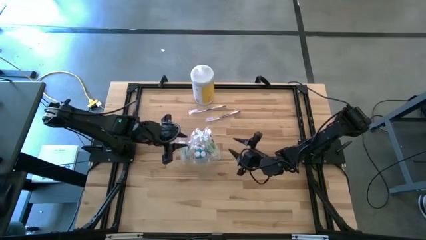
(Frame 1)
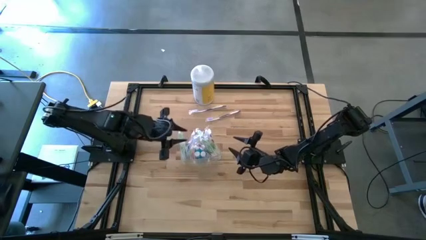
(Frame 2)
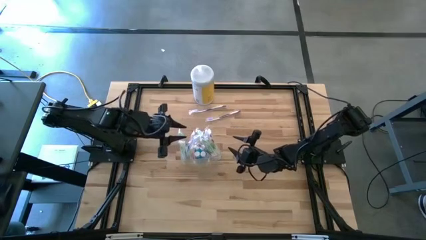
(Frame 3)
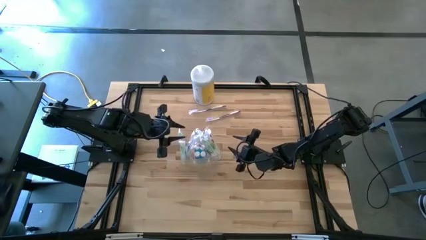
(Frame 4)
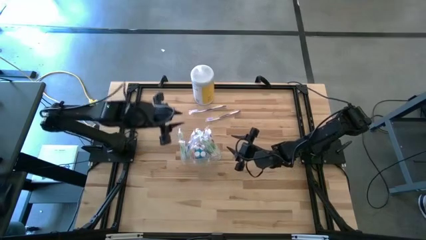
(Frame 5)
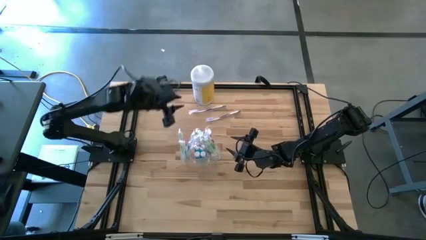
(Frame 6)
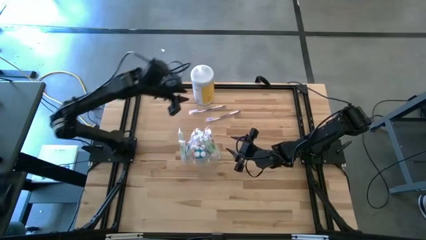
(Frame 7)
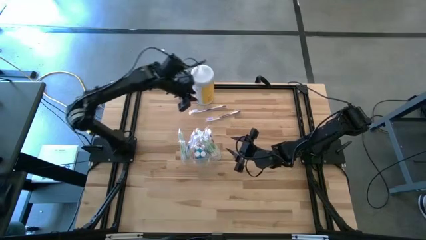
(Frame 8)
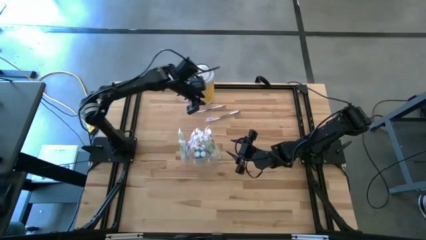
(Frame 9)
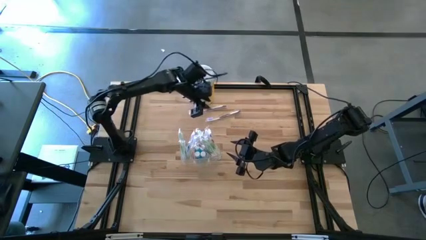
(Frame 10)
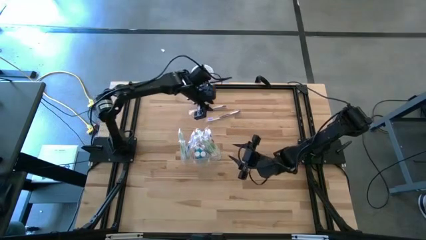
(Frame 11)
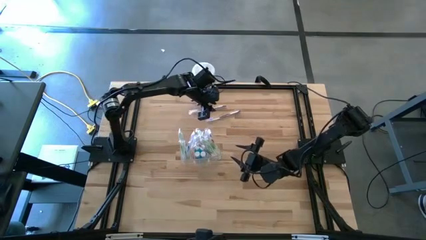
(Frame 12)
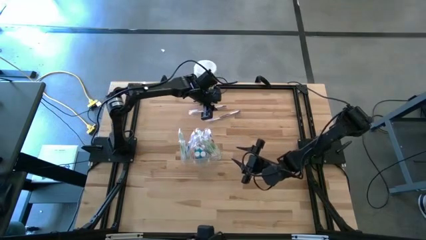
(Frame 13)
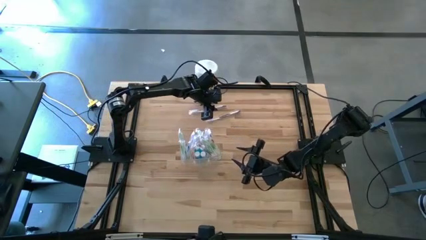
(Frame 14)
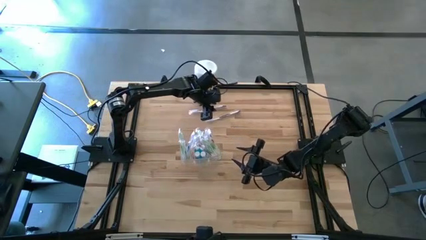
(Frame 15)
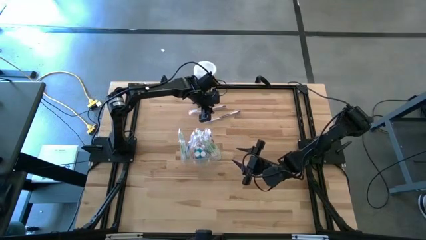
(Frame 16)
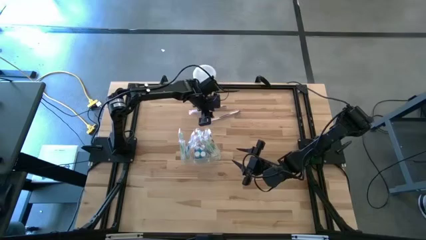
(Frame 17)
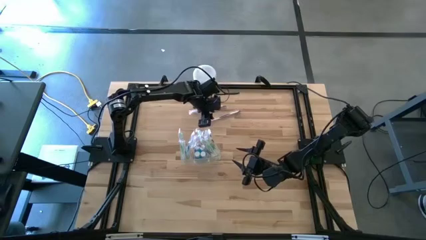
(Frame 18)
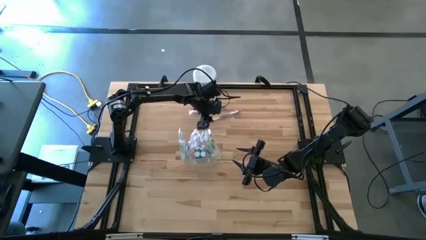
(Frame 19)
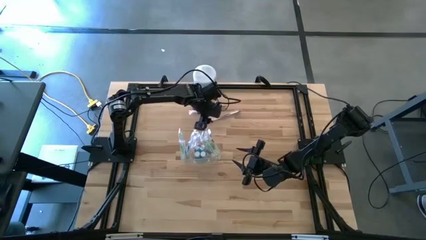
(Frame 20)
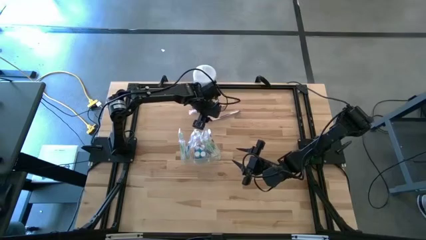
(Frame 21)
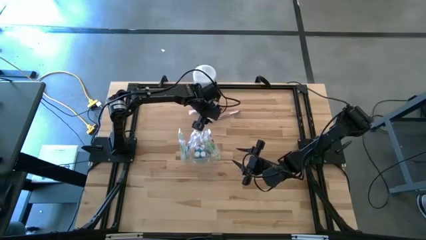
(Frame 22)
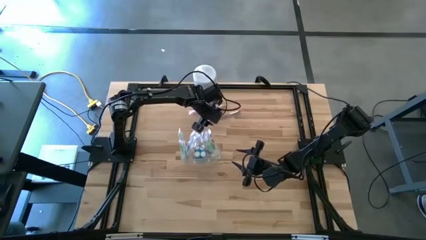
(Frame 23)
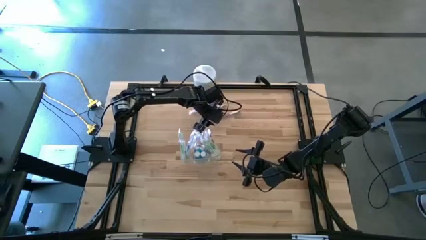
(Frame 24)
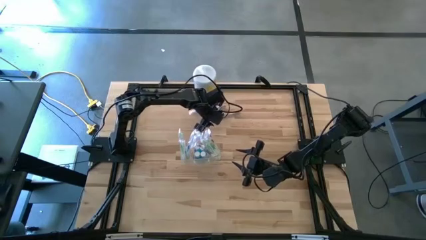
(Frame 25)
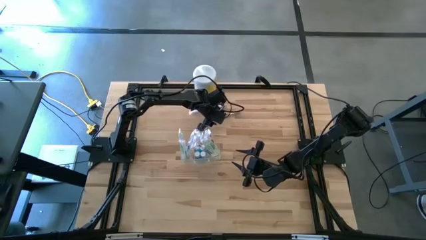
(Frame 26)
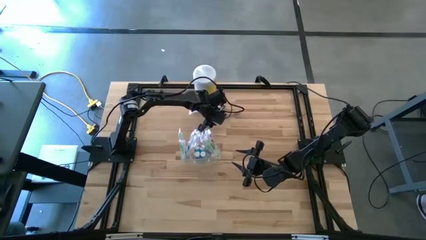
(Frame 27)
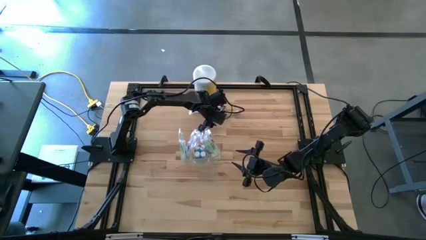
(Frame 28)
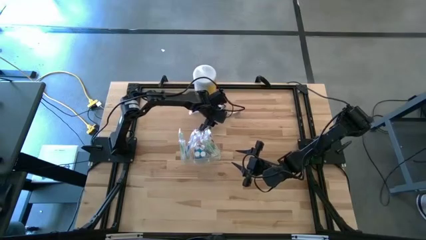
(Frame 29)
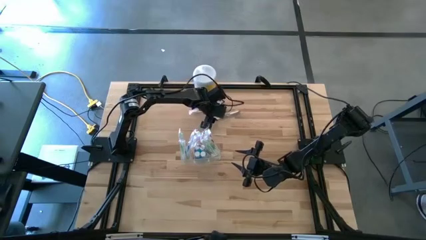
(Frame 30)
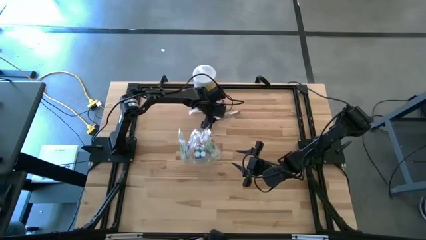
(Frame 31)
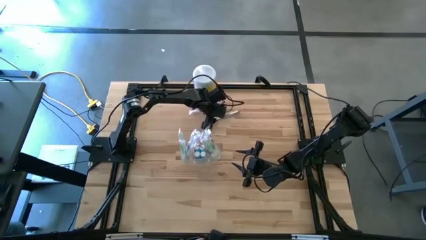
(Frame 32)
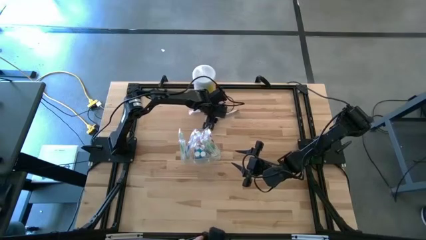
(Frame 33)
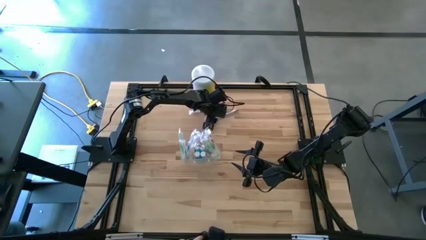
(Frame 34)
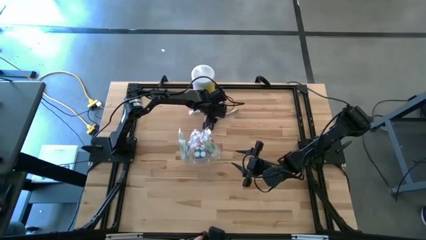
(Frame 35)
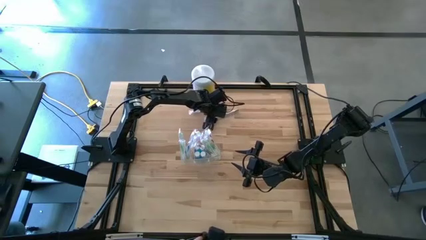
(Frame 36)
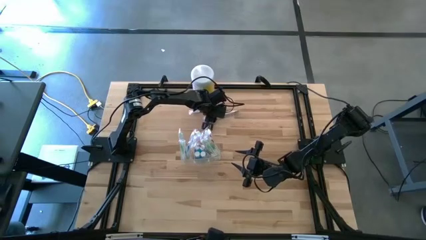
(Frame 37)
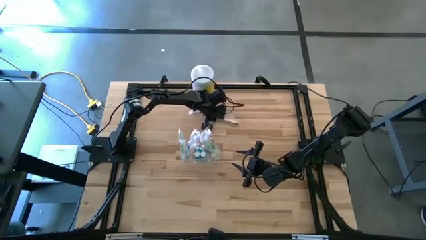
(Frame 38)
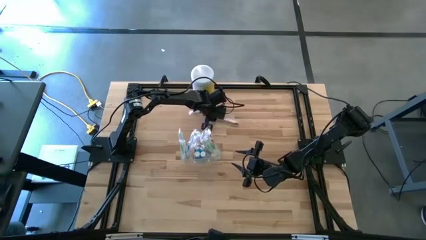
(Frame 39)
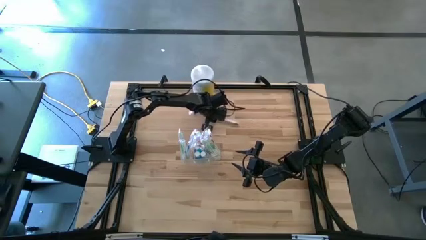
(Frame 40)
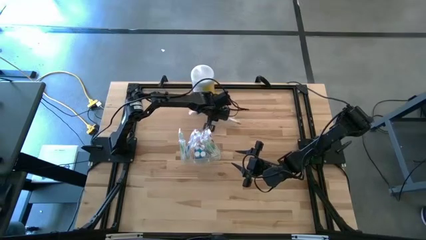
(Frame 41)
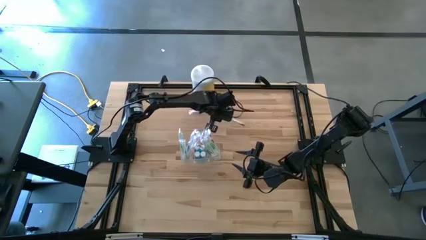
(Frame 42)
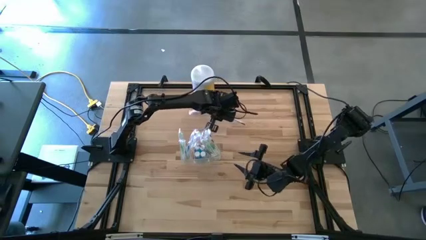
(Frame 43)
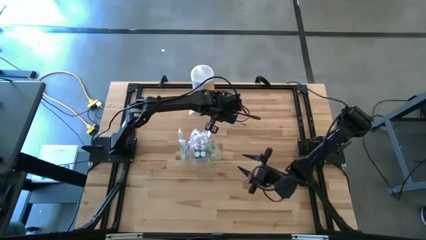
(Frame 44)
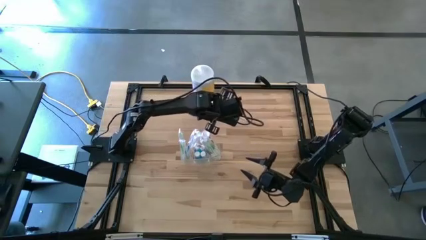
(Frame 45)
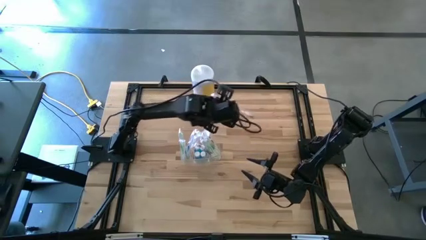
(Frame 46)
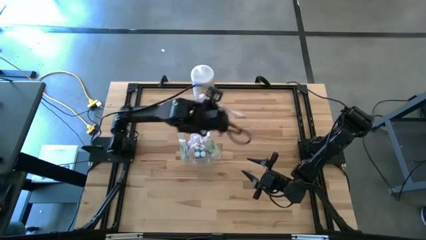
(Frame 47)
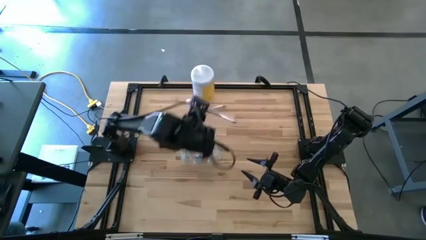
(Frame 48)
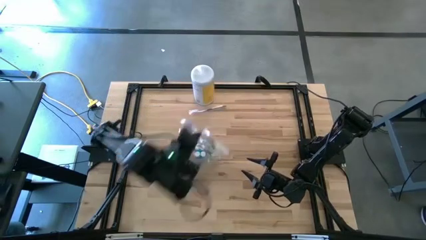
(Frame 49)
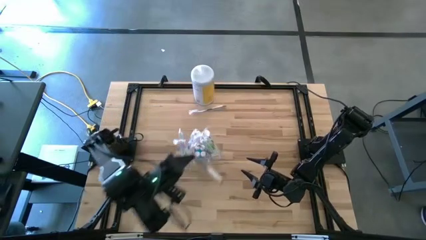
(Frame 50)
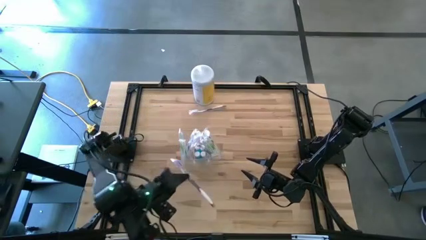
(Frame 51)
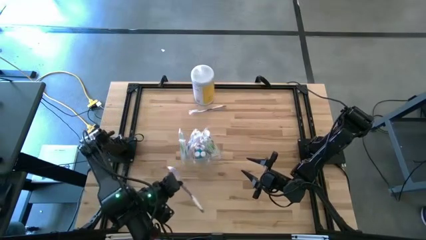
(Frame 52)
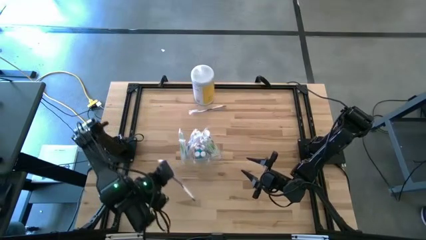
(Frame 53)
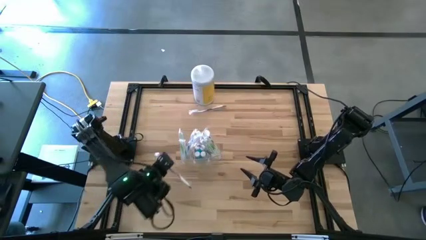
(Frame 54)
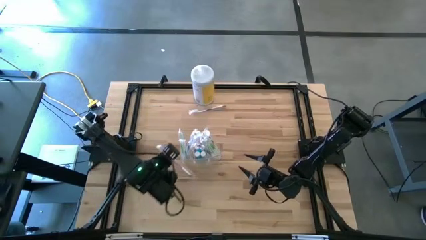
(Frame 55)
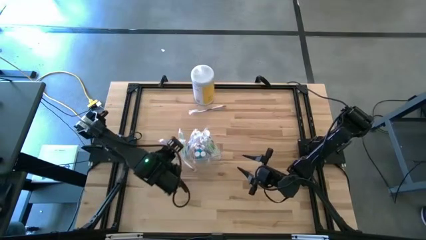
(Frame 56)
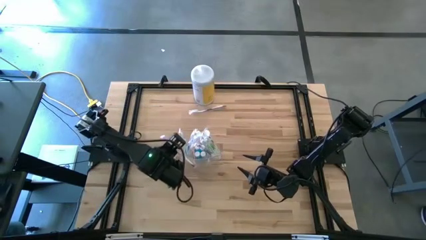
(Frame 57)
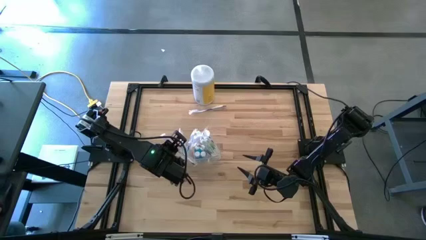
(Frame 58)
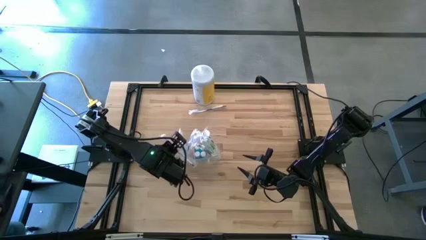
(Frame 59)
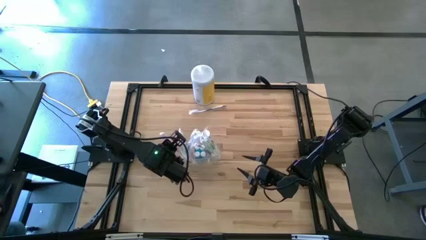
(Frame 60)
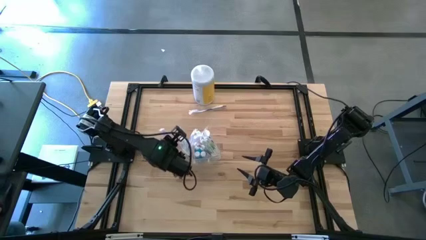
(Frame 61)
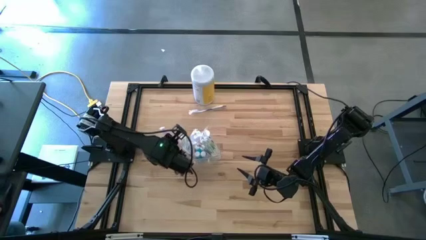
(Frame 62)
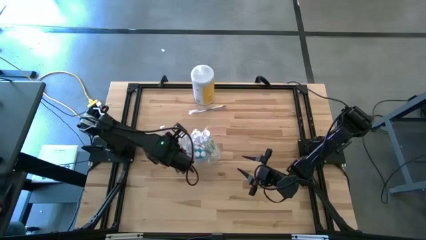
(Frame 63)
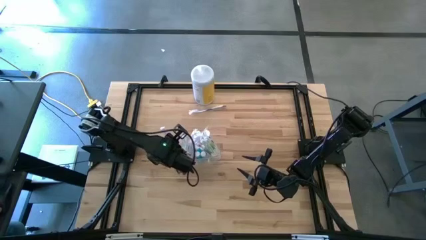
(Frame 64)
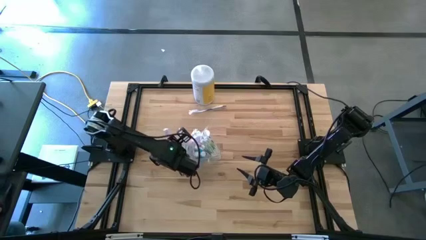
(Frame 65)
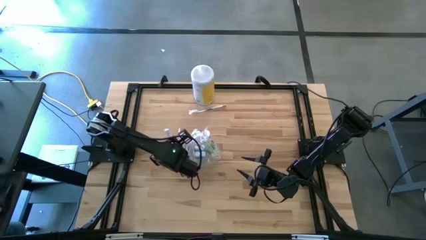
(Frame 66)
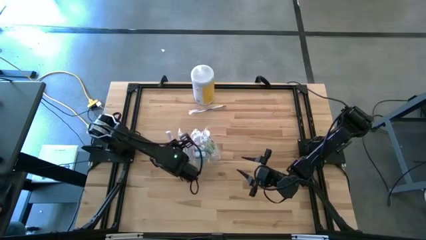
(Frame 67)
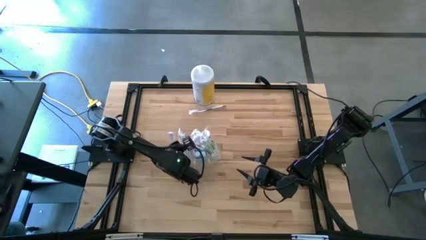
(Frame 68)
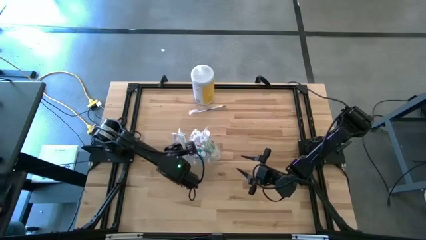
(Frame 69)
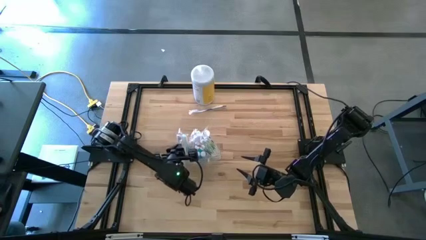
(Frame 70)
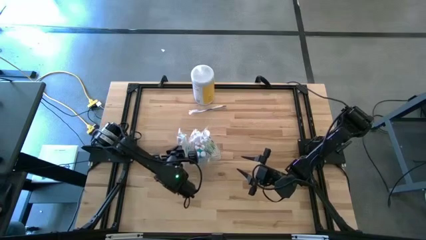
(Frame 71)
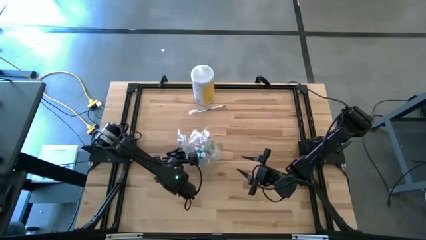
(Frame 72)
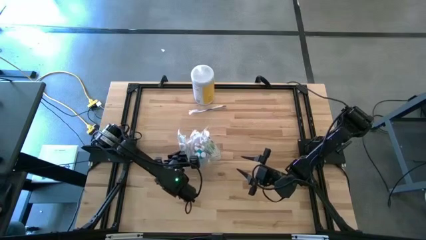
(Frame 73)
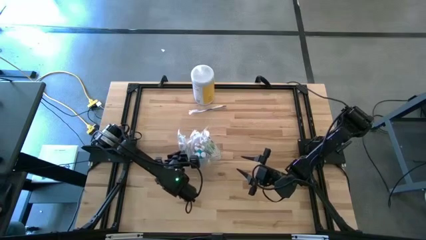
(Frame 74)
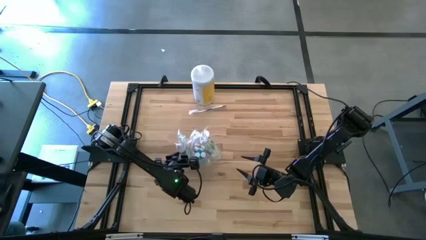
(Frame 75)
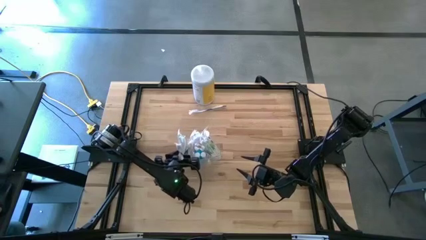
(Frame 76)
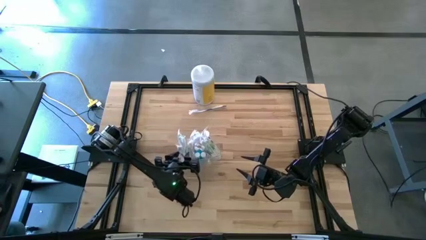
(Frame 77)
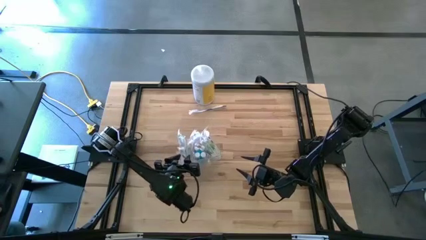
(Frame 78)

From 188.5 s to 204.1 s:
Task: Pick & Place toothbrushing station
Put the violet toothbrush into the transparent organizer
